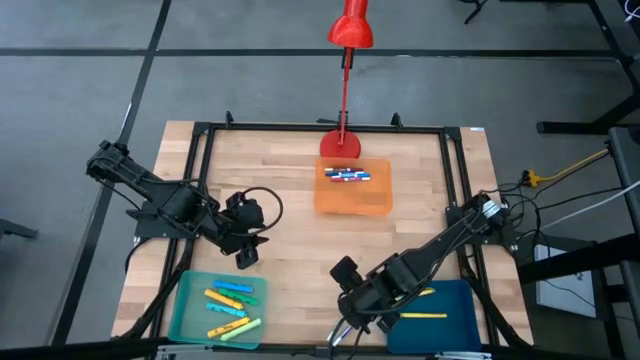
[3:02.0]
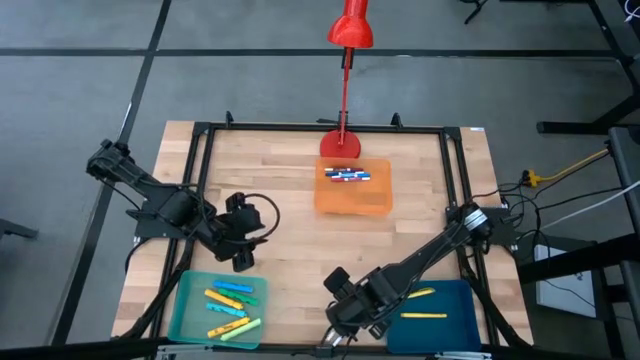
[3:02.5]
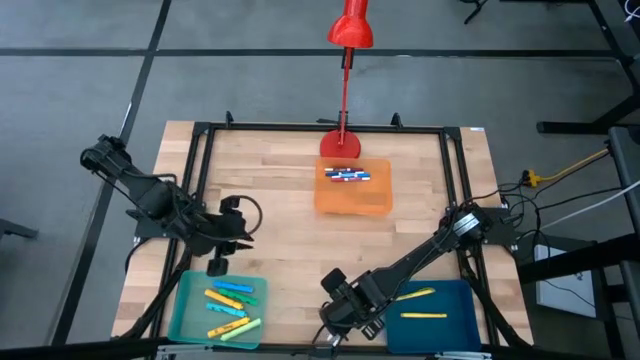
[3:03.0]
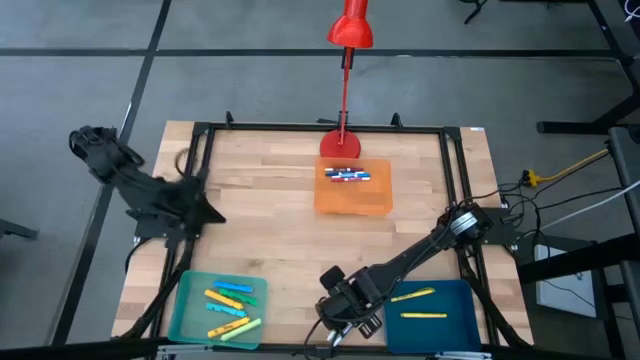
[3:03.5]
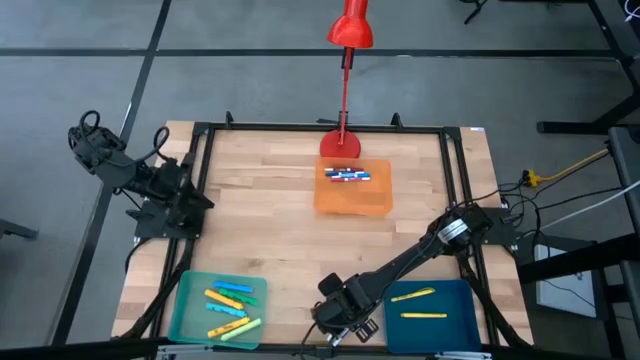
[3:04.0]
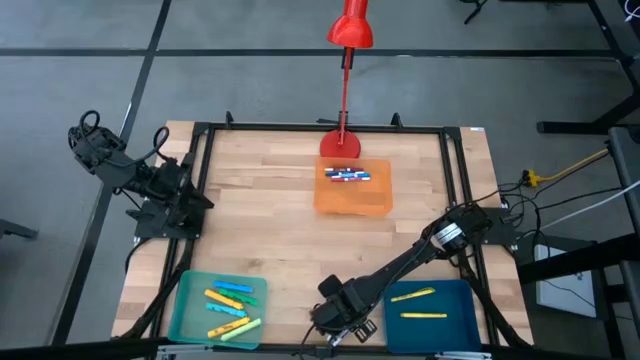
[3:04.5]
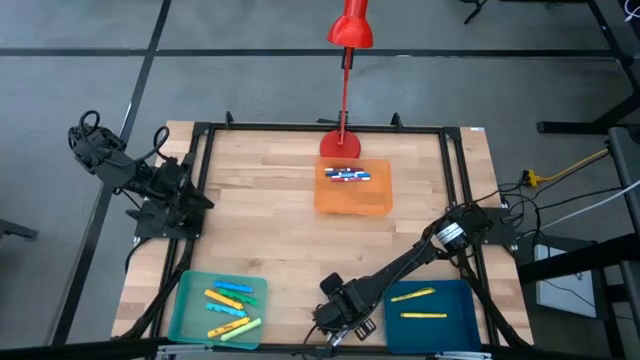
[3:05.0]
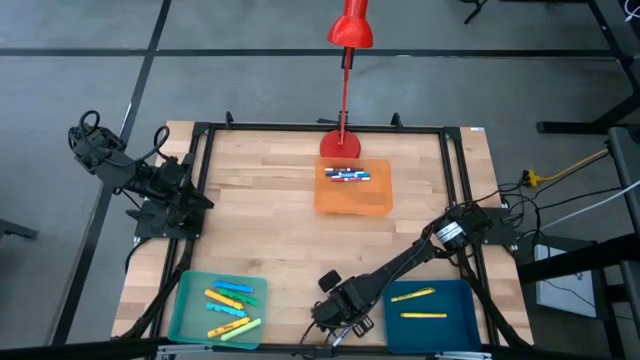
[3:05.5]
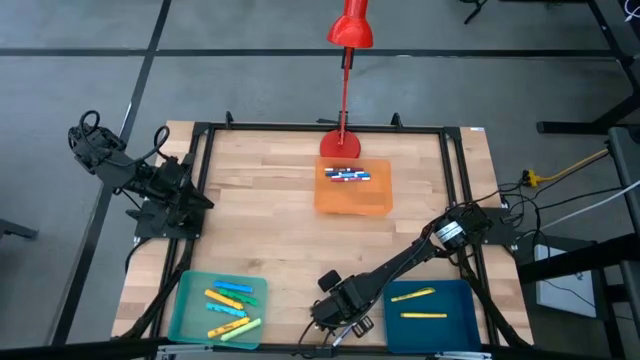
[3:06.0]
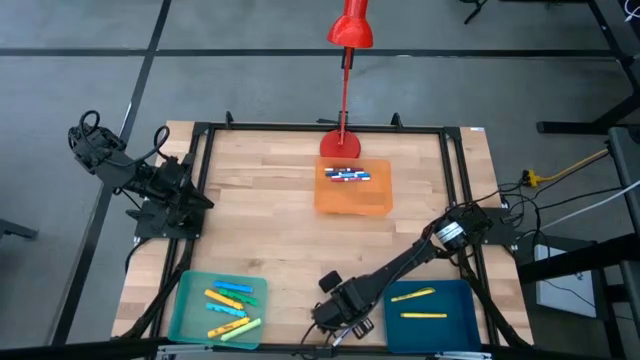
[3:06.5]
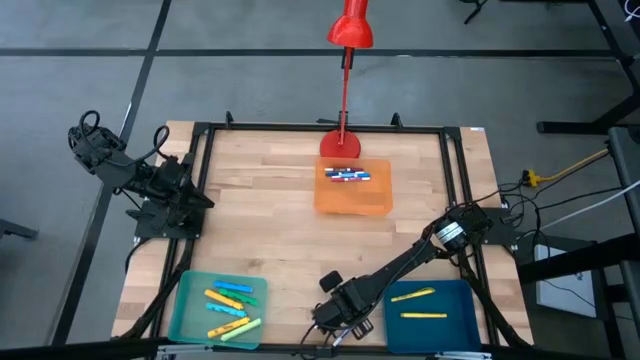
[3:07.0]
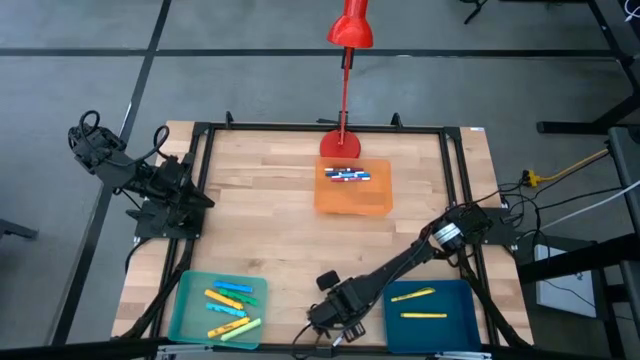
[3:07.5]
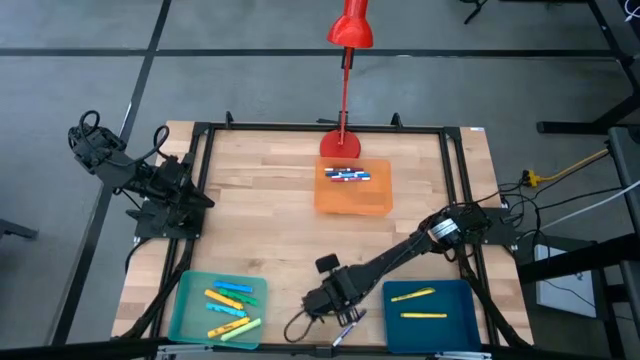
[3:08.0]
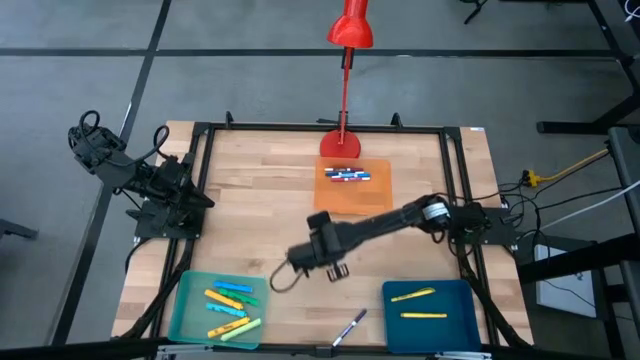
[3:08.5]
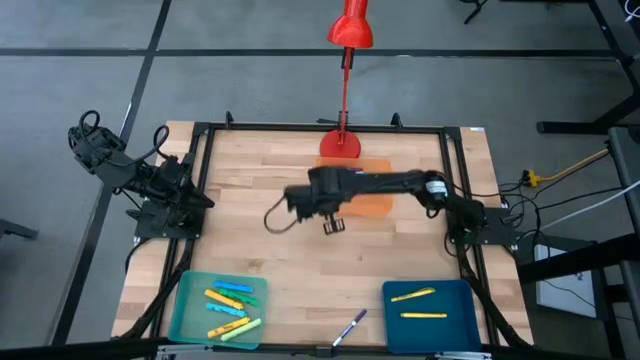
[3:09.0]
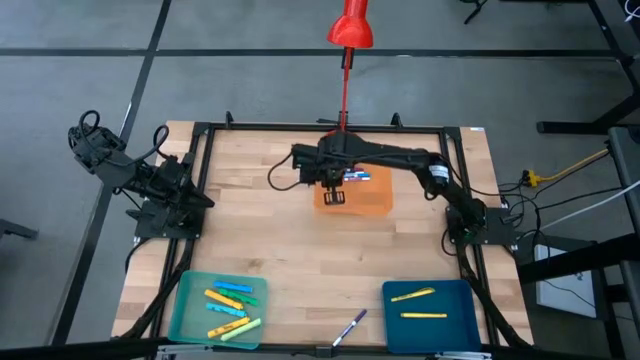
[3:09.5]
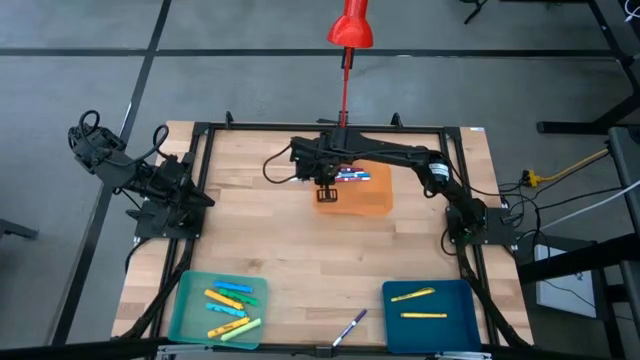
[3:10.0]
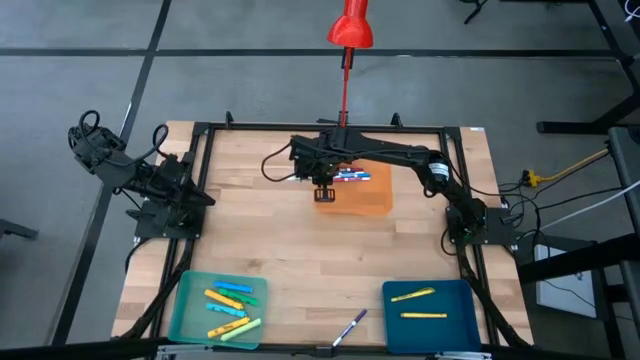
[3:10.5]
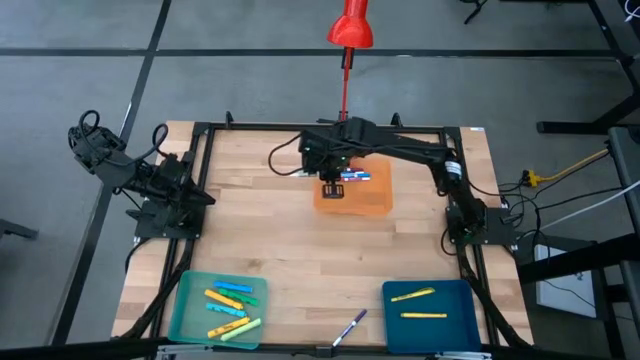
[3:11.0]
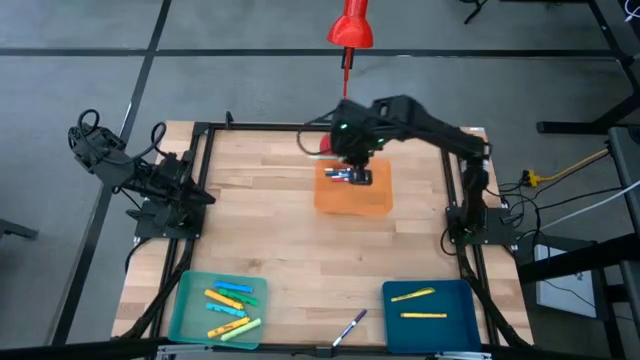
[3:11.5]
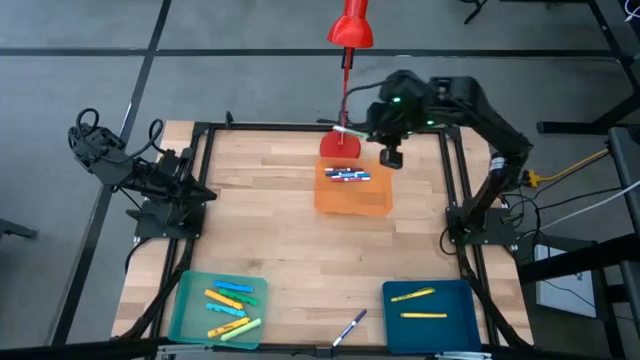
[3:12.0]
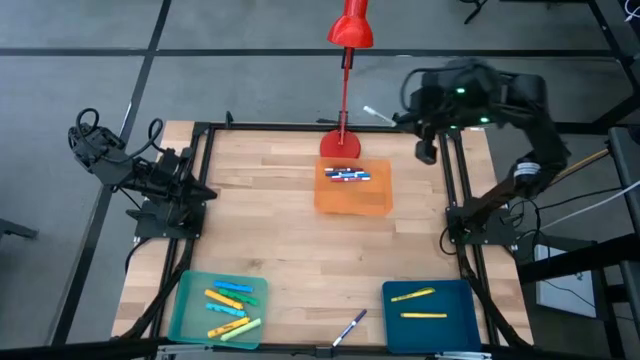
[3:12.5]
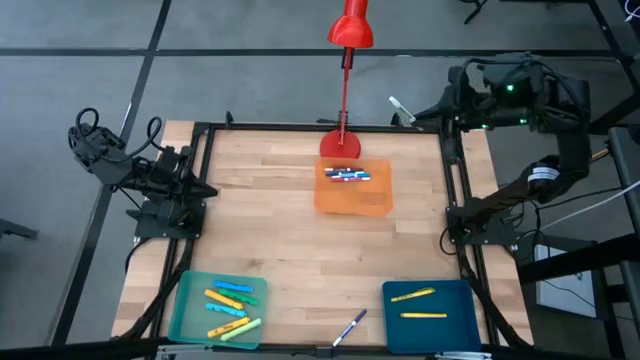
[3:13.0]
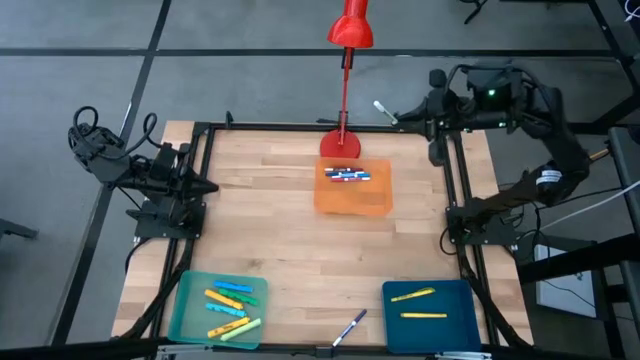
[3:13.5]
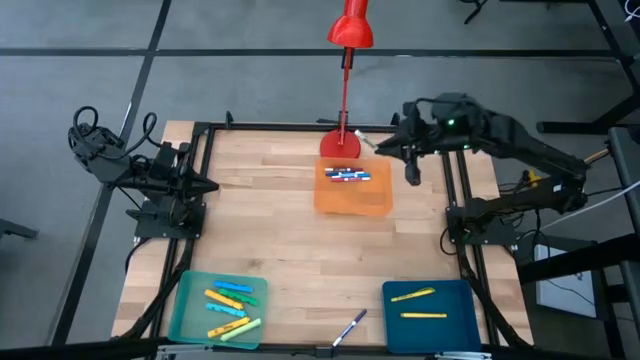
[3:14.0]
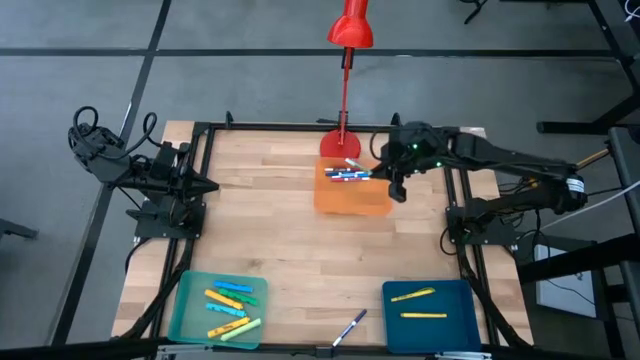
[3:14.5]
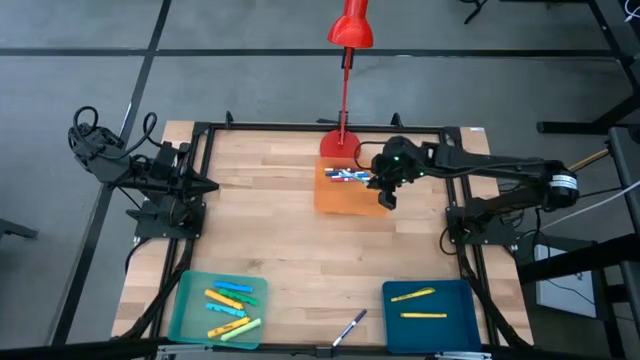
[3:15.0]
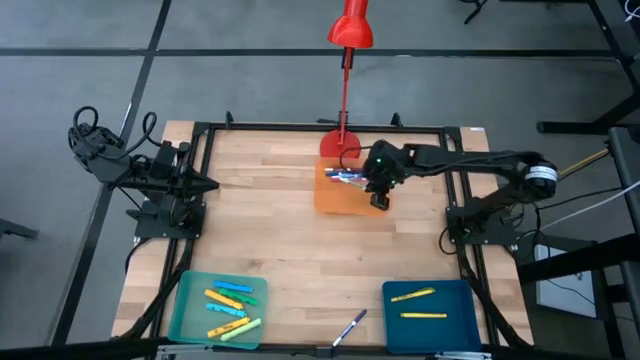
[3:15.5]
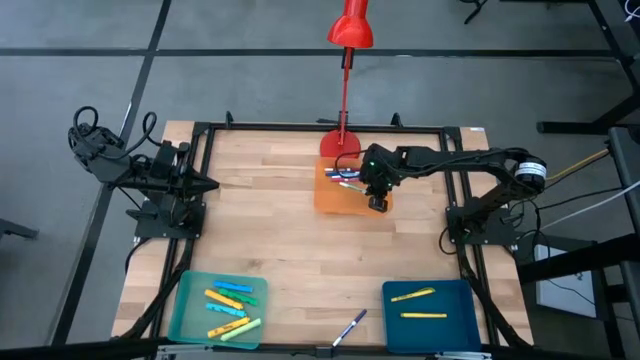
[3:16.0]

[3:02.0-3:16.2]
Task: Pick & Place Markers
Put the green marker pen into the orange bin

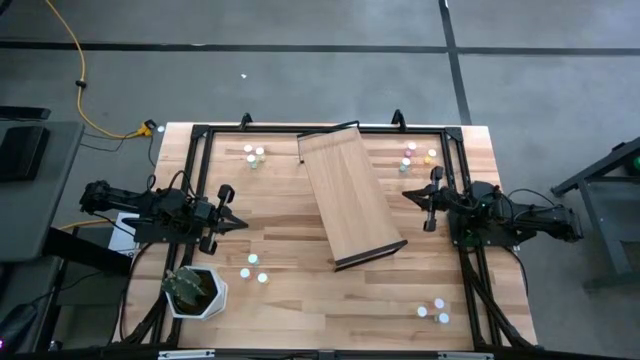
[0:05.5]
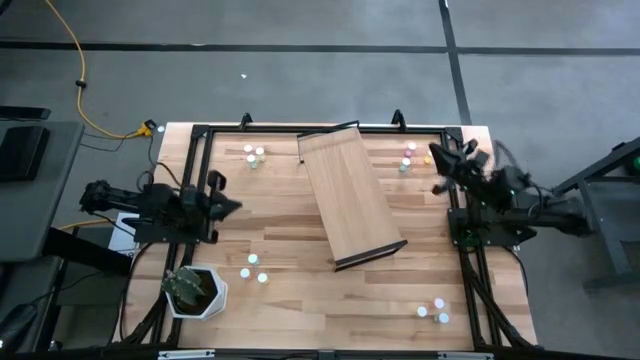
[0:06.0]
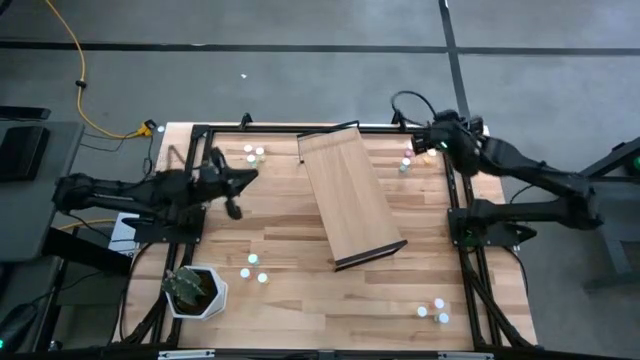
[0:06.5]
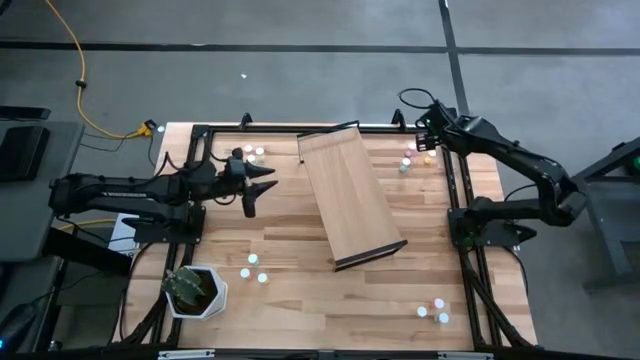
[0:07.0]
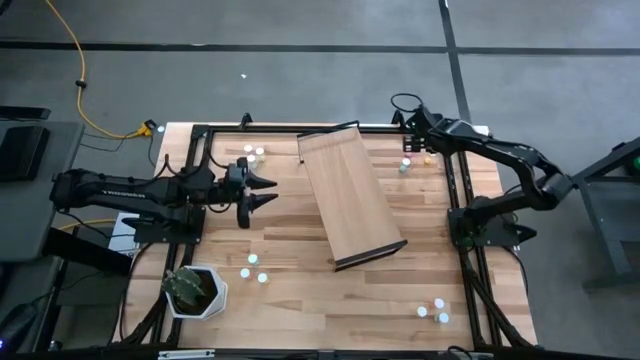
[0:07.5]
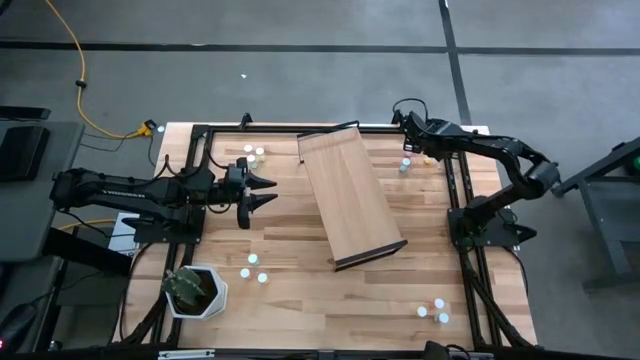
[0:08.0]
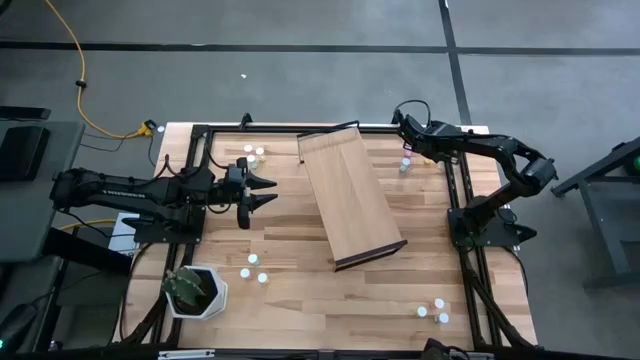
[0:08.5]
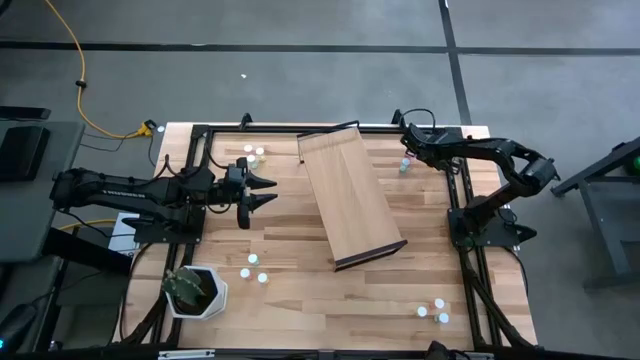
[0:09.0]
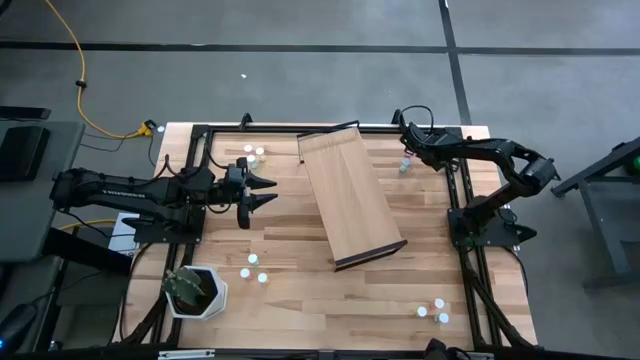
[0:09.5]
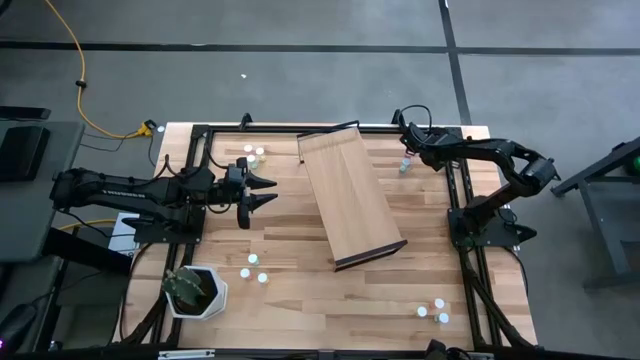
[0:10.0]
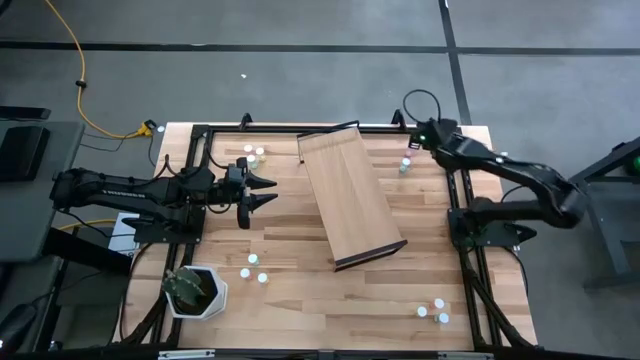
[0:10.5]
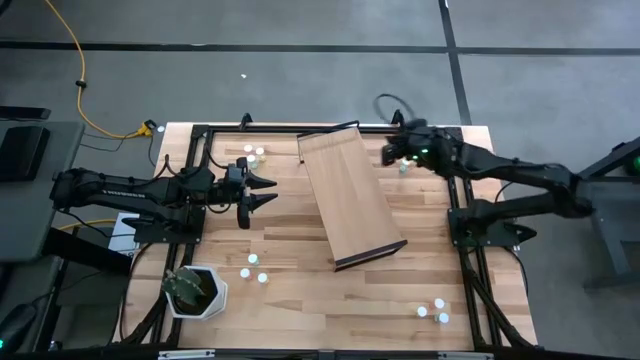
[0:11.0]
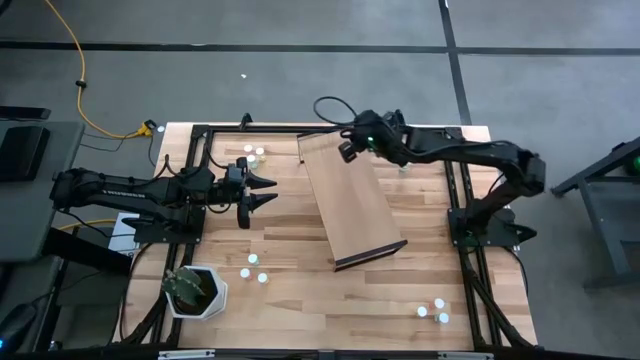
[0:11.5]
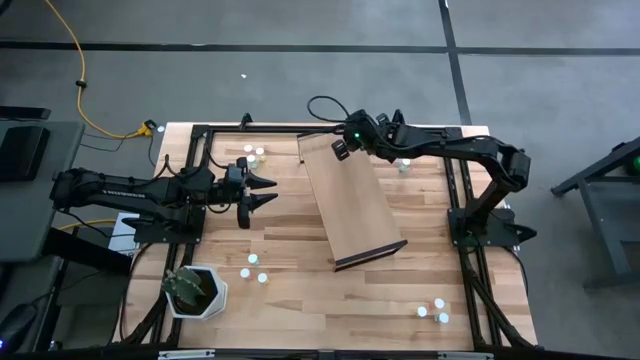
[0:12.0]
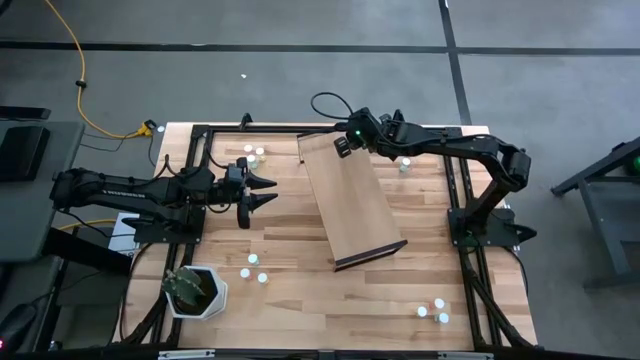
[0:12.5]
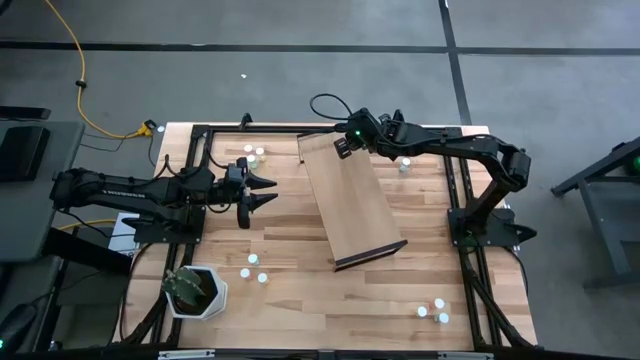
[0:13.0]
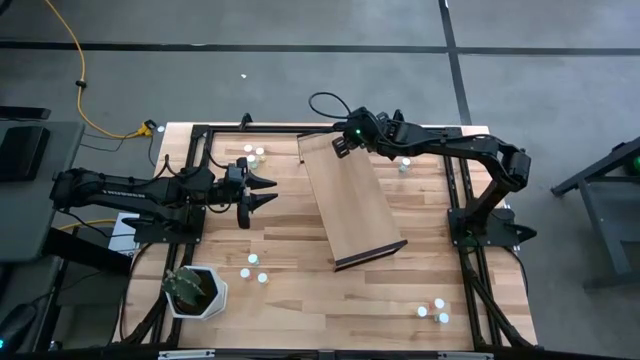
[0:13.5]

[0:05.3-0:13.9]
Task: Pick and place medicine bottles onto shelf by color
Put the yellow pill bottle on the shelf
